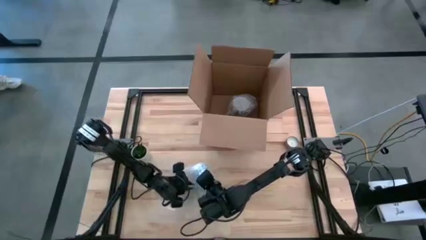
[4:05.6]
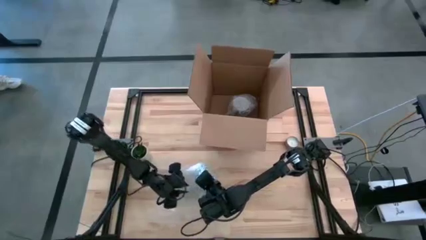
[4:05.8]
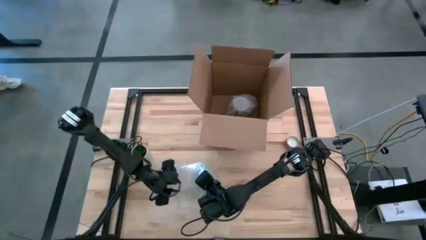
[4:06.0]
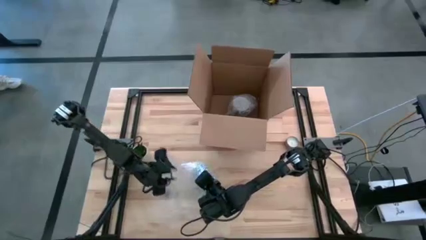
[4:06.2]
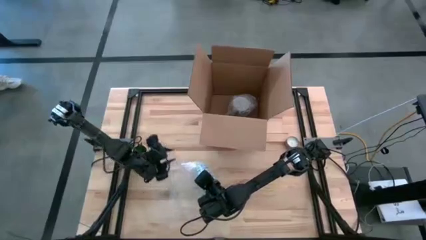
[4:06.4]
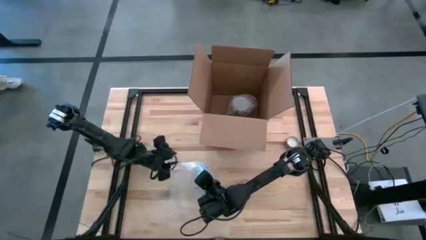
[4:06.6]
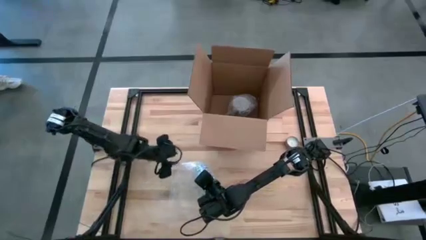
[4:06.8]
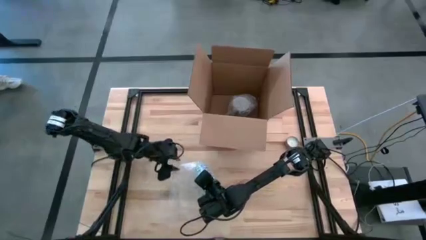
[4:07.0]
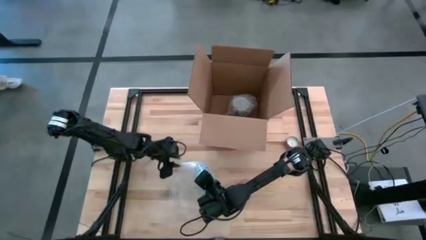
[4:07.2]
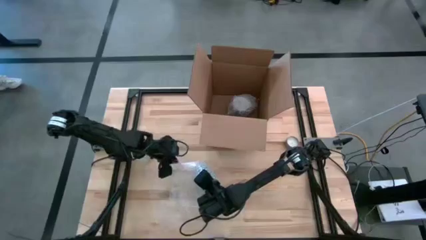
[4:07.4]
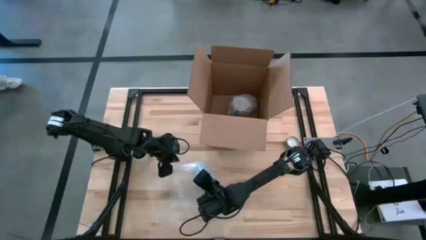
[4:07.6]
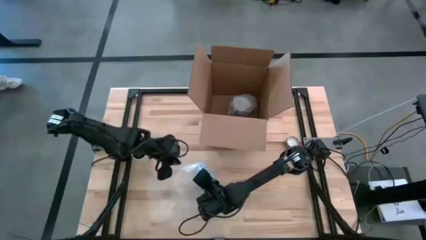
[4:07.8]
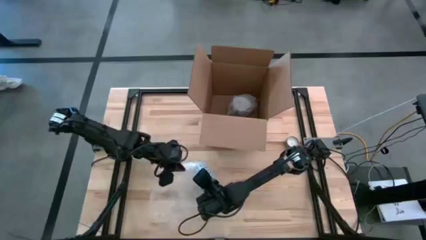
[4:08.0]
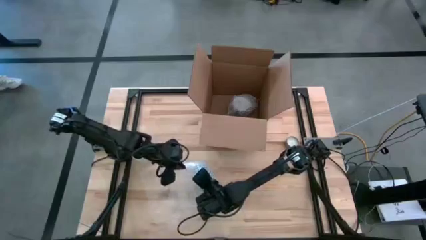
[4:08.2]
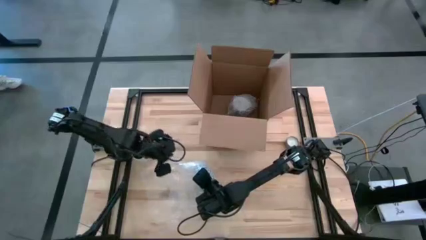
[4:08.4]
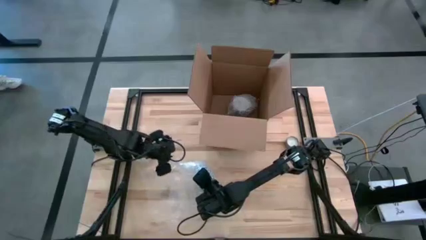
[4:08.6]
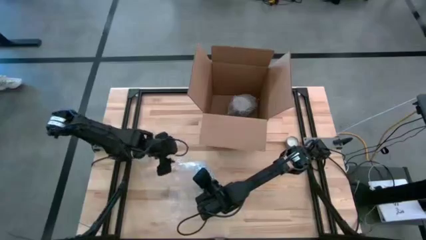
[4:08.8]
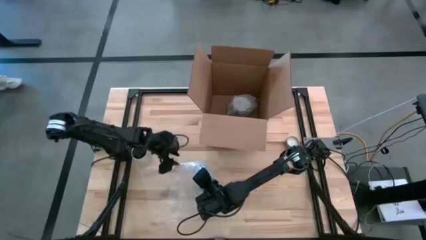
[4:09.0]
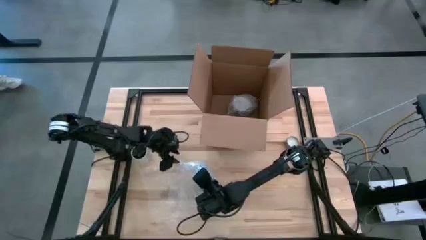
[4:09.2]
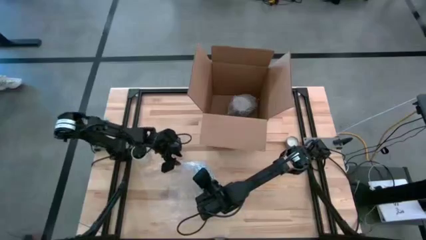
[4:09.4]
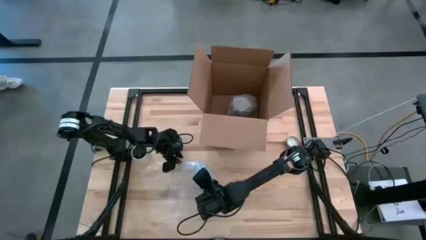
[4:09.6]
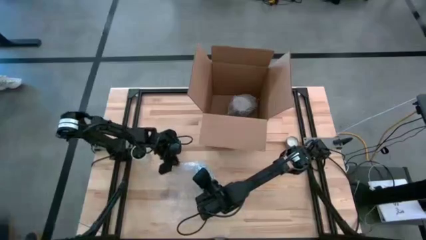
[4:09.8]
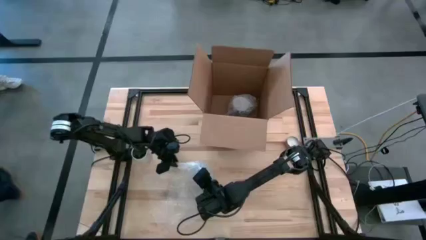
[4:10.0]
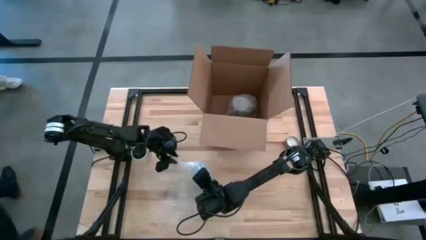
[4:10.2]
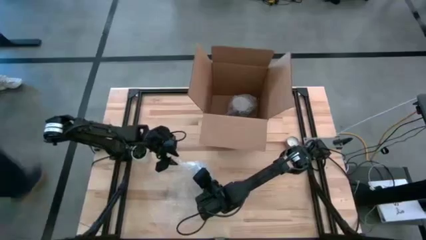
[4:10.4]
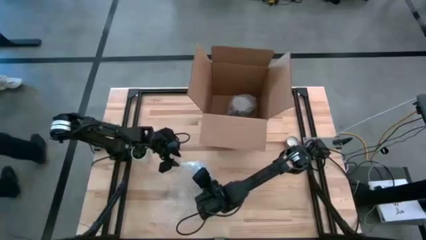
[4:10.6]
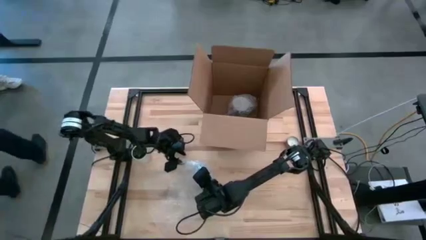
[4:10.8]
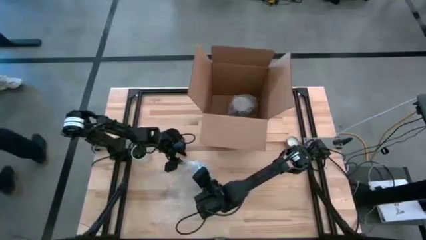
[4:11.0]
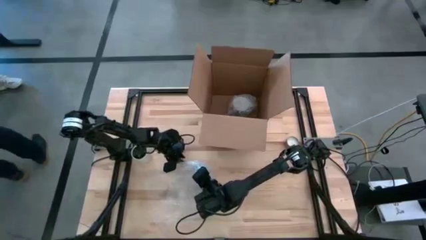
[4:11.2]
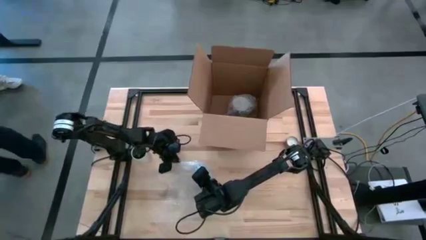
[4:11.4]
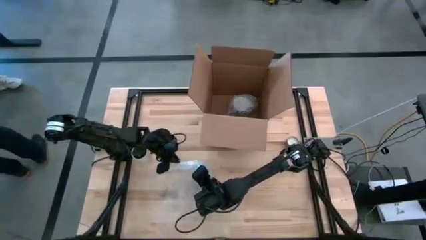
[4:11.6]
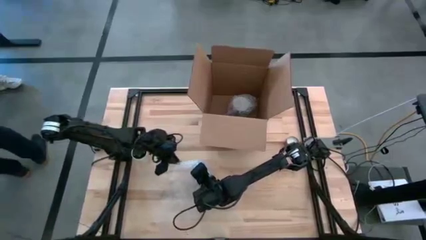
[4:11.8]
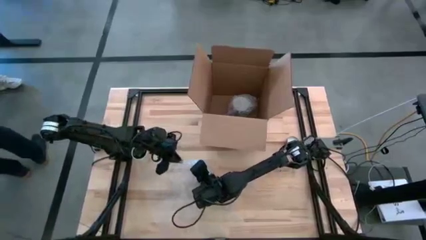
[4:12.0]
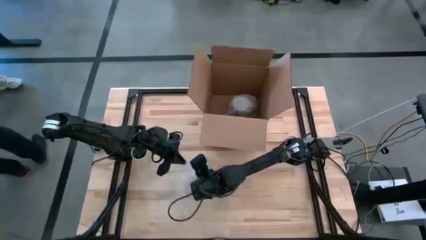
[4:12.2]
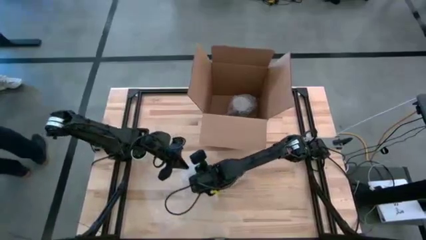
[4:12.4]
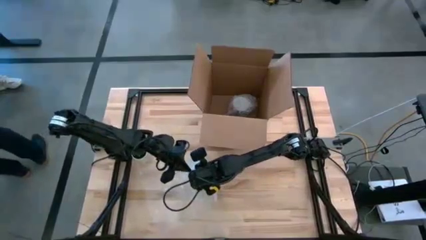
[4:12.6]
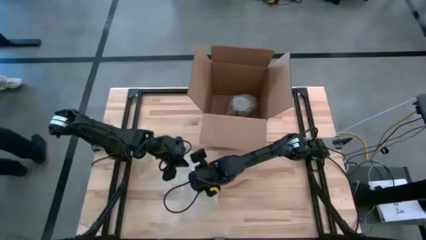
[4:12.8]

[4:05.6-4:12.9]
Task: wrap mug
Wrap the blue patterned mug with the bubble wrap

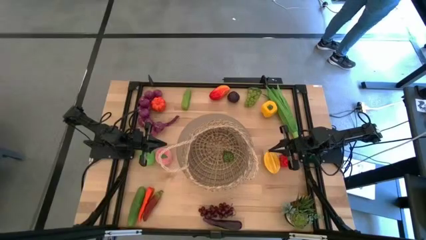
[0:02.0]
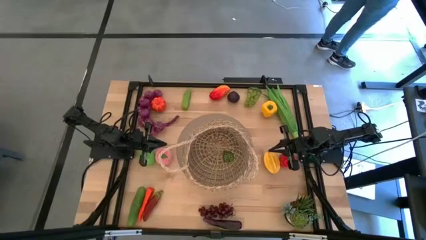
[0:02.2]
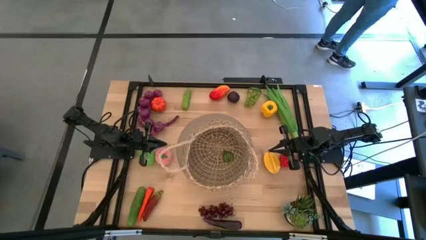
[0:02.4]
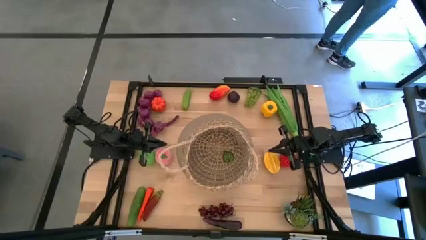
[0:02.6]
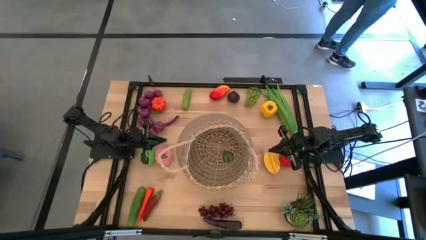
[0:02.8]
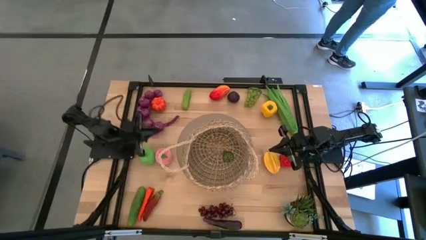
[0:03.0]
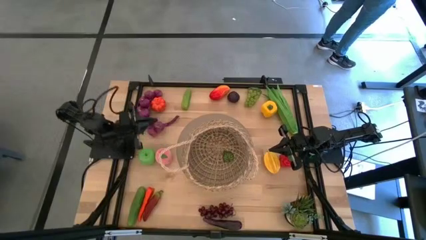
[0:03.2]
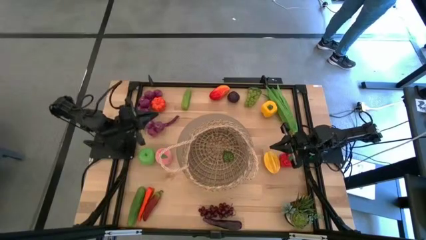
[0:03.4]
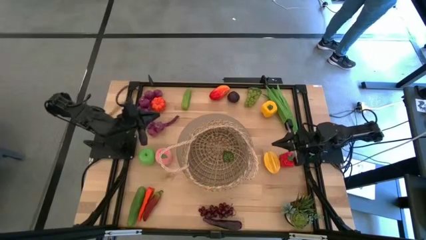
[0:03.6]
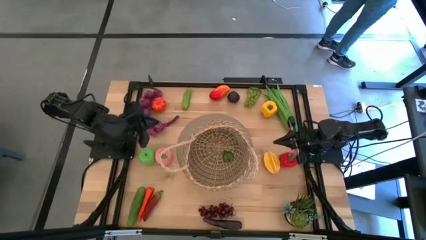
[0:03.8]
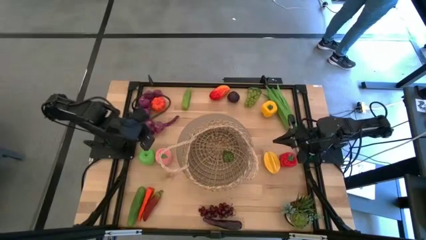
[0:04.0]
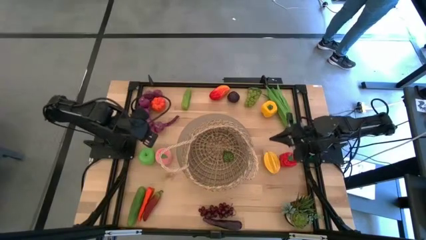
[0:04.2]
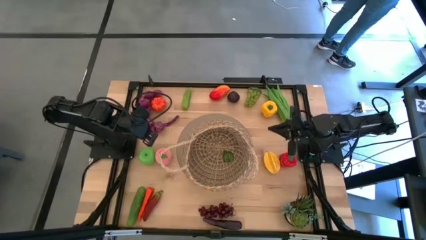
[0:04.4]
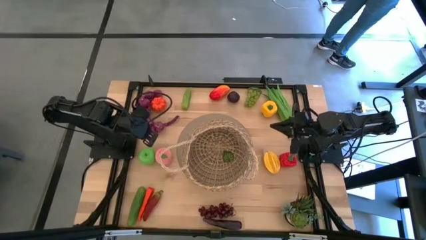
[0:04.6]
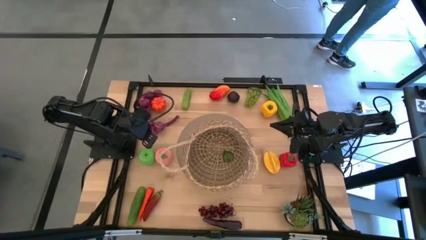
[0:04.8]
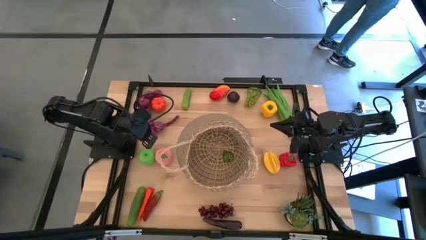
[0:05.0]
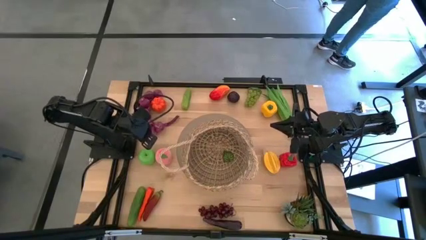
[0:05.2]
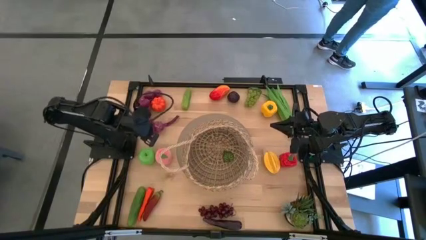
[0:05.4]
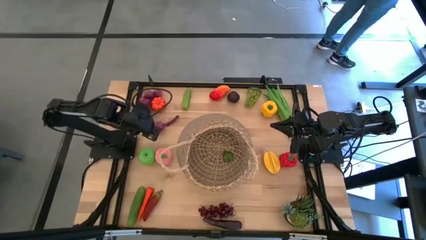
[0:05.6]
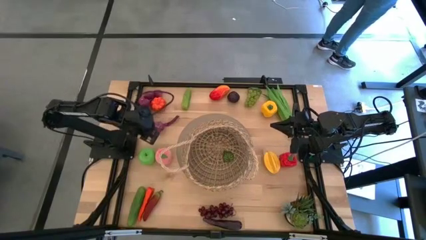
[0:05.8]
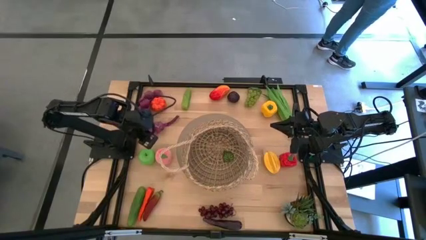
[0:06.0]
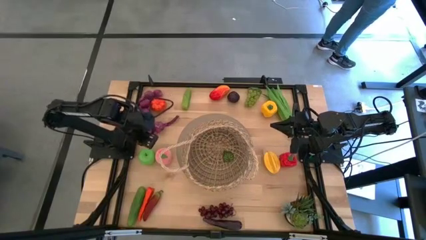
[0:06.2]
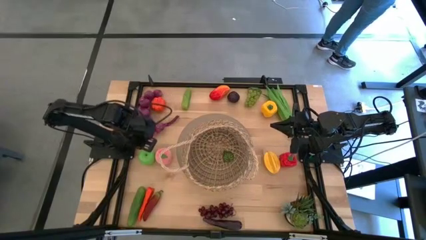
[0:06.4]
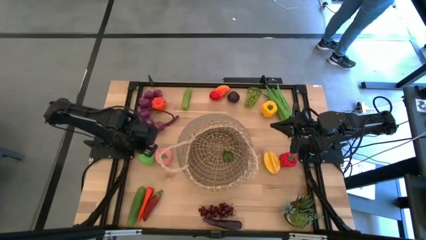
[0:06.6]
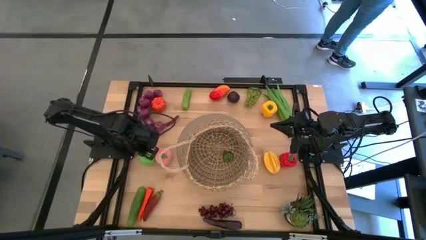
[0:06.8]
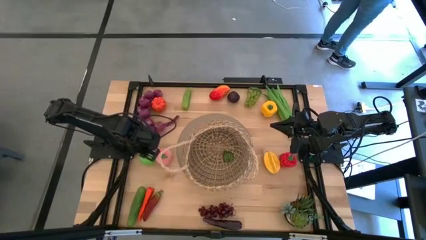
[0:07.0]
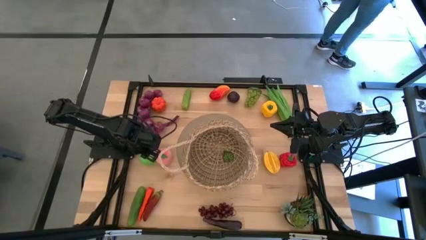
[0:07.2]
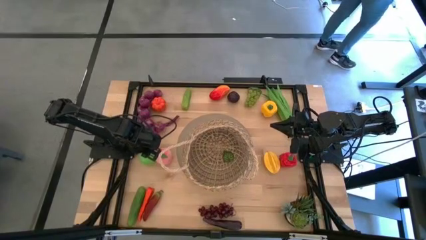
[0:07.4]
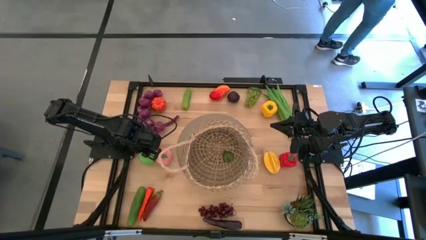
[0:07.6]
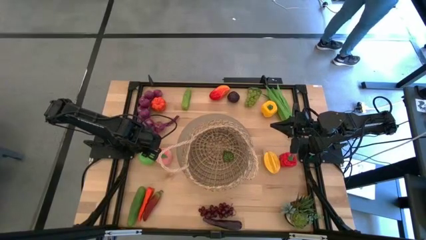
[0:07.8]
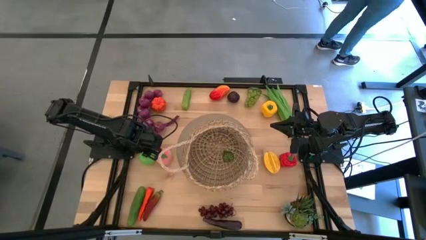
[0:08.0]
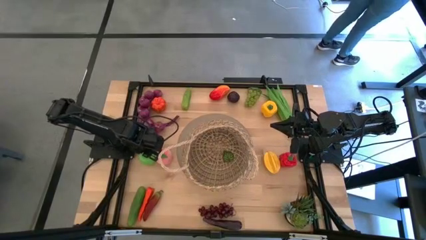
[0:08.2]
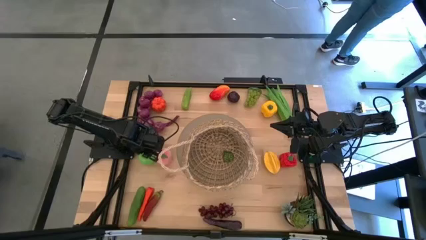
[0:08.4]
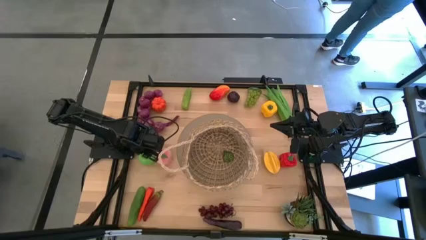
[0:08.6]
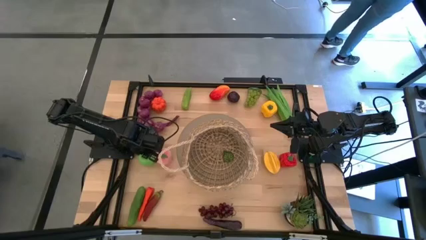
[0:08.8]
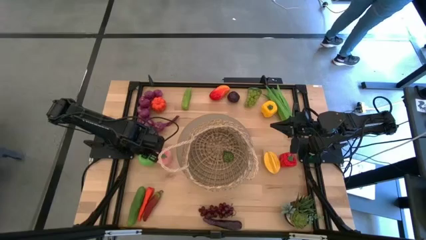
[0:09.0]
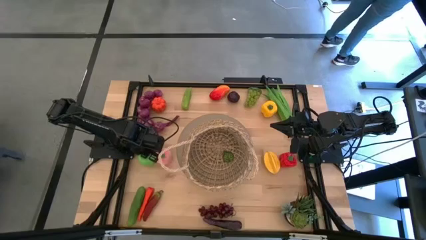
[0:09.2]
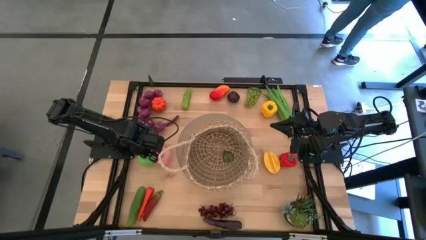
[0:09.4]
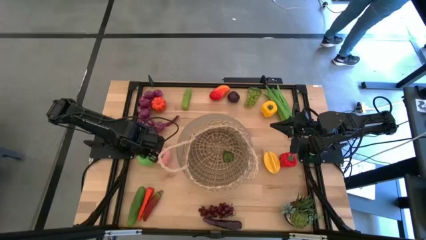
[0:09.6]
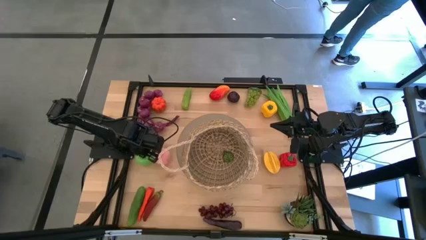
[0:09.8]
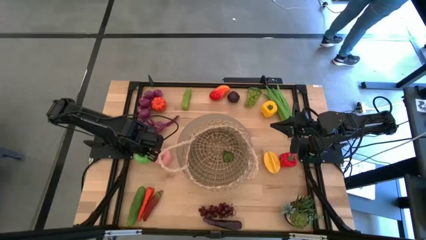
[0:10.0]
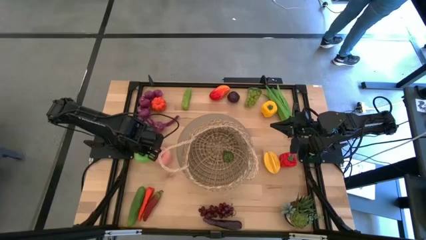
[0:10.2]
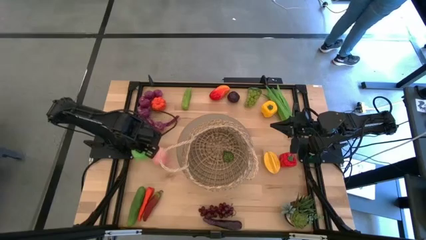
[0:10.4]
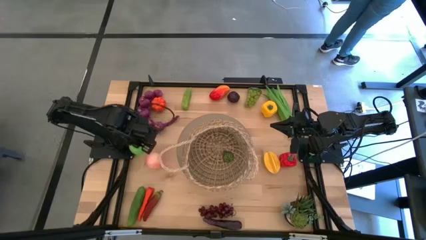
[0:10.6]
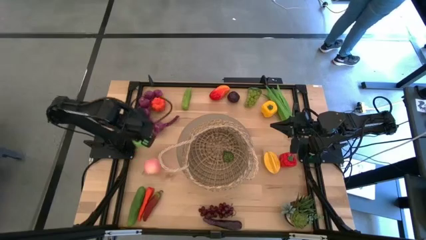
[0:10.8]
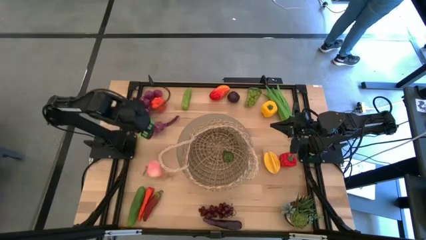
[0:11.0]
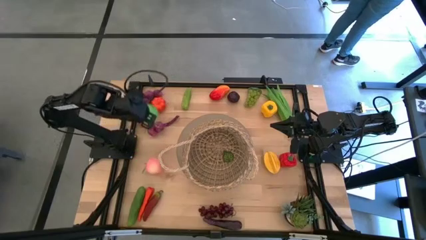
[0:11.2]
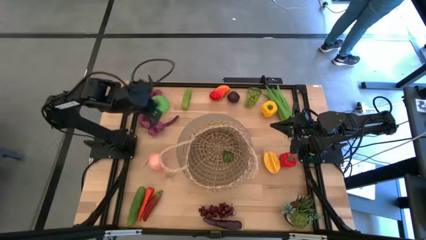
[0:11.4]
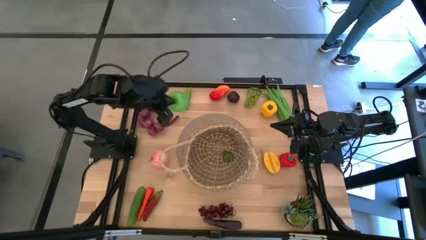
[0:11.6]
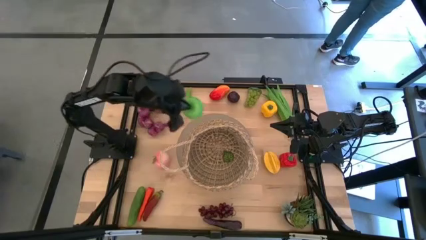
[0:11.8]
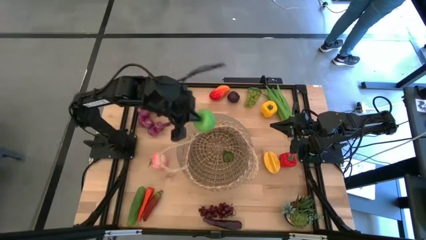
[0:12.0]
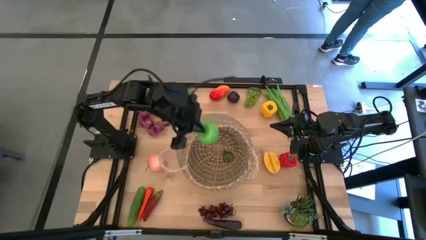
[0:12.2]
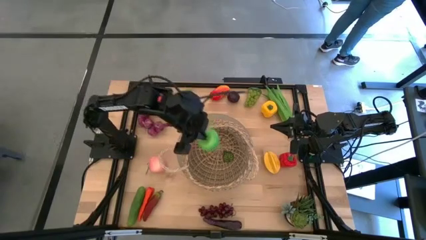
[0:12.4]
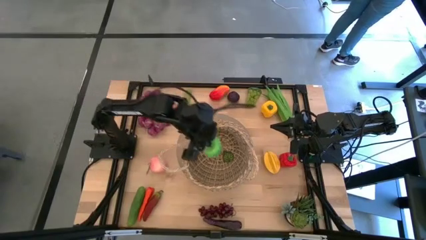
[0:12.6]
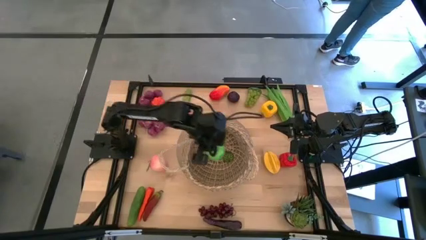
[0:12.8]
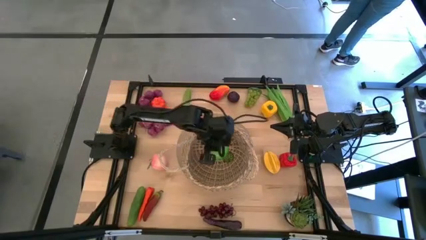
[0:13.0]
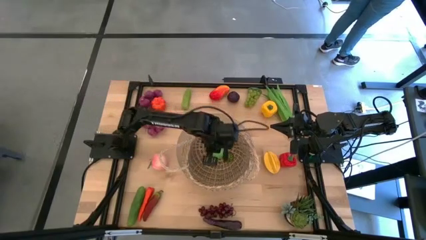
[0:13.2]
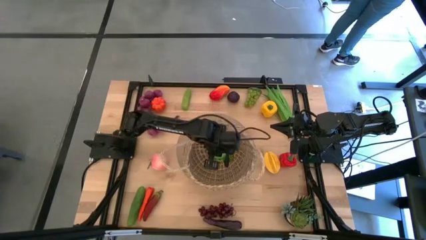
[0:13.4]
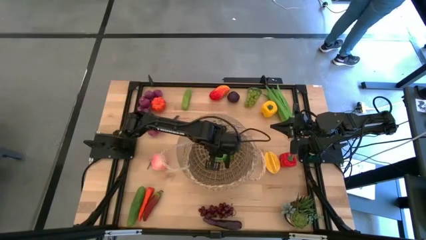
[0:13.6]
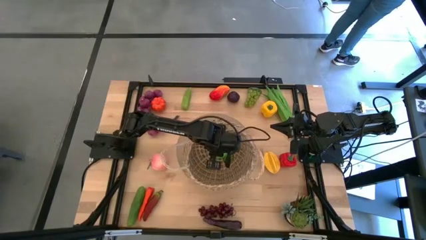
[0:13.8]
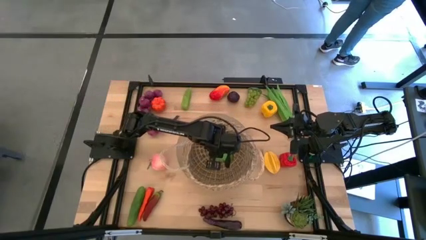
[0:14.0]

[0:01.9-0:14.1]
Task: Build produce basket
Put the green apple into the brown basket
